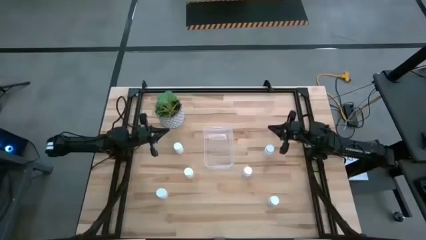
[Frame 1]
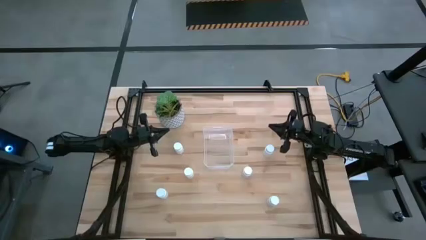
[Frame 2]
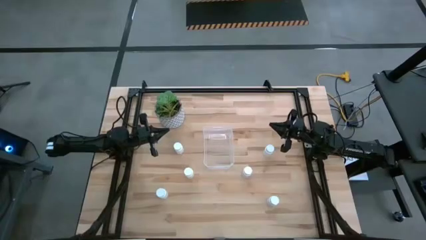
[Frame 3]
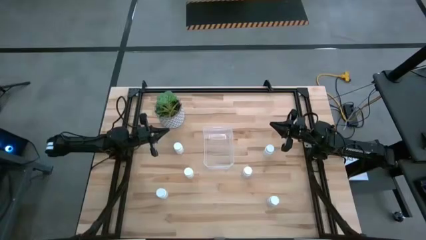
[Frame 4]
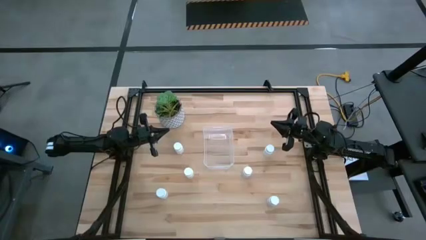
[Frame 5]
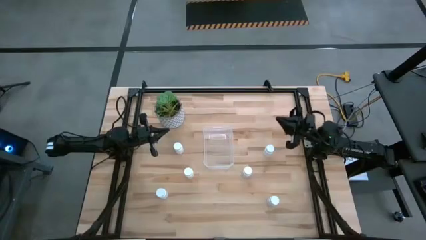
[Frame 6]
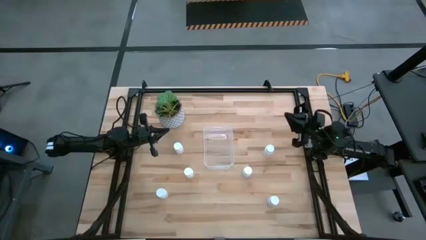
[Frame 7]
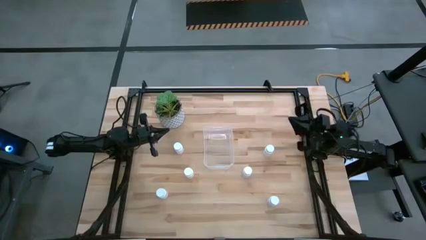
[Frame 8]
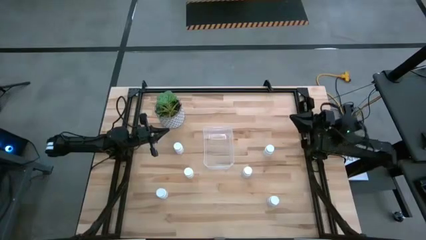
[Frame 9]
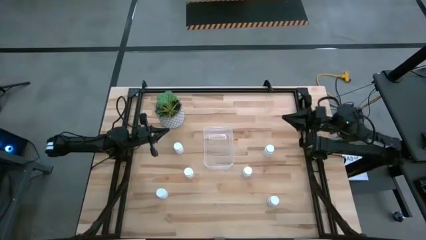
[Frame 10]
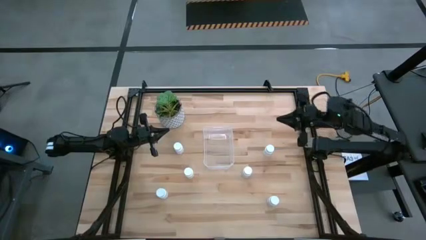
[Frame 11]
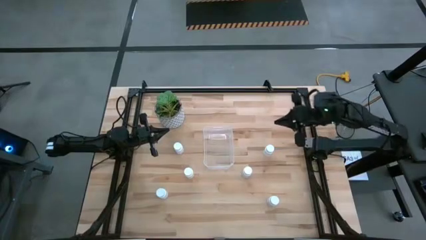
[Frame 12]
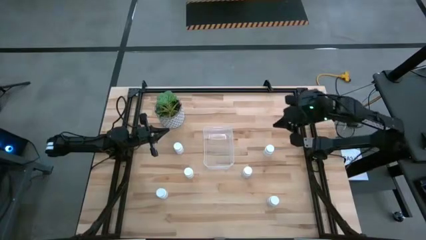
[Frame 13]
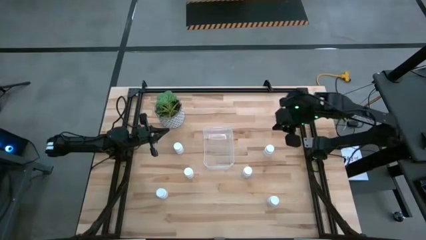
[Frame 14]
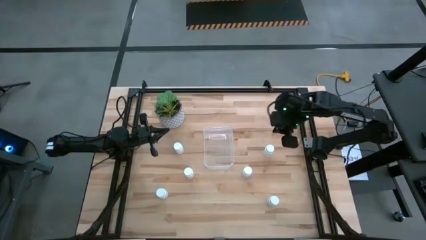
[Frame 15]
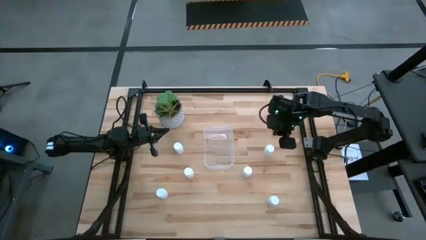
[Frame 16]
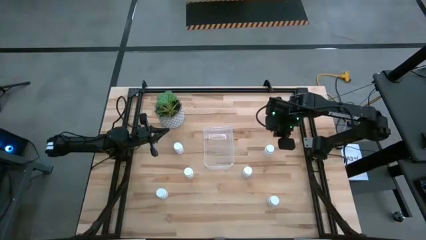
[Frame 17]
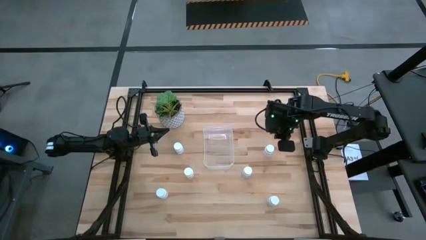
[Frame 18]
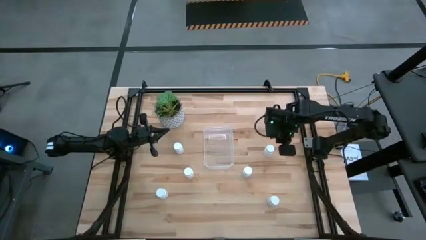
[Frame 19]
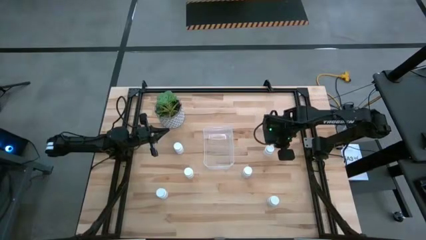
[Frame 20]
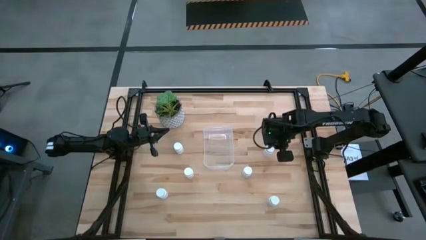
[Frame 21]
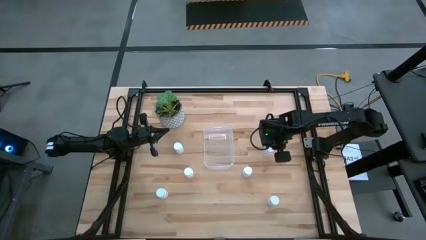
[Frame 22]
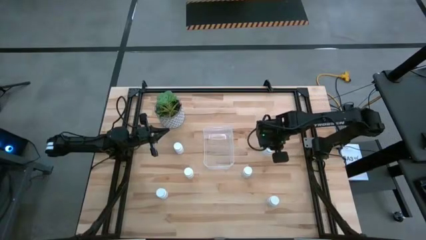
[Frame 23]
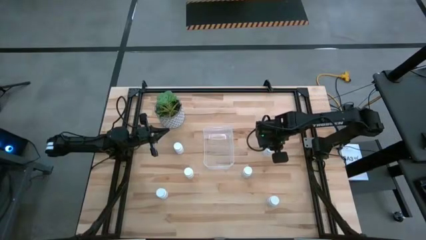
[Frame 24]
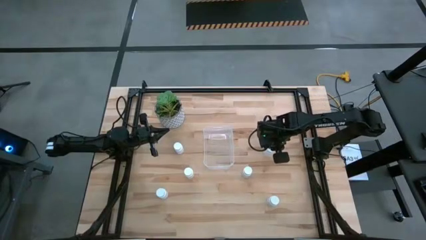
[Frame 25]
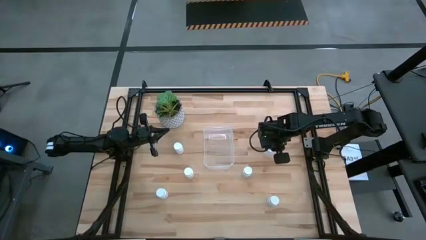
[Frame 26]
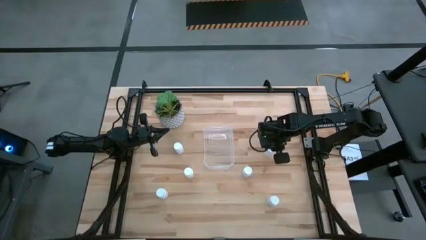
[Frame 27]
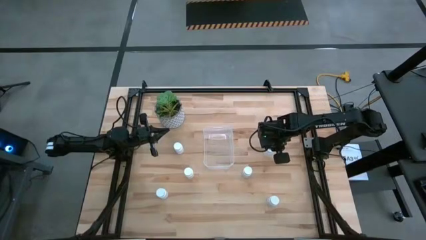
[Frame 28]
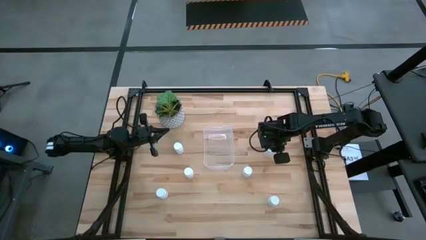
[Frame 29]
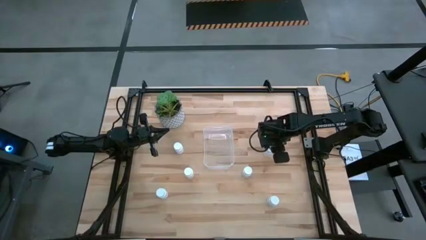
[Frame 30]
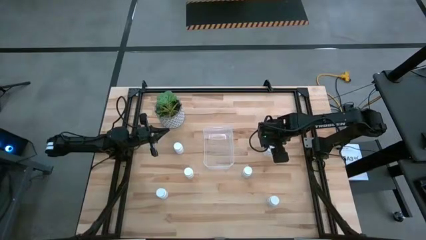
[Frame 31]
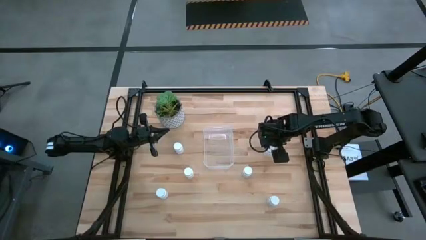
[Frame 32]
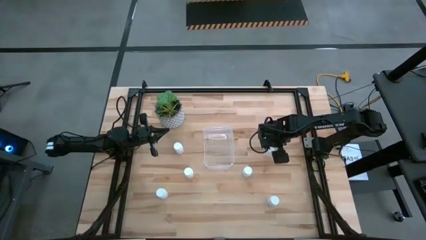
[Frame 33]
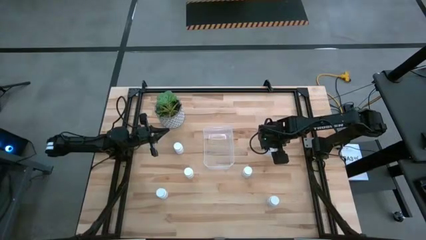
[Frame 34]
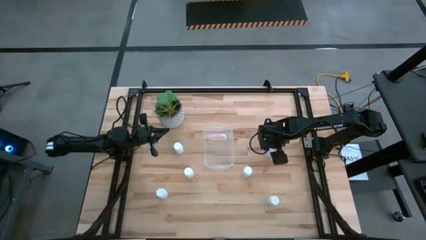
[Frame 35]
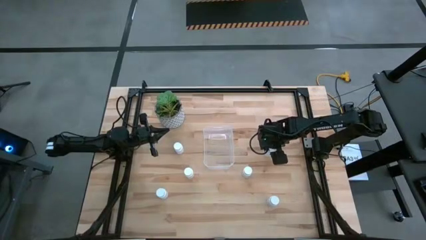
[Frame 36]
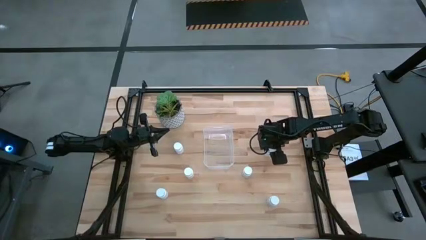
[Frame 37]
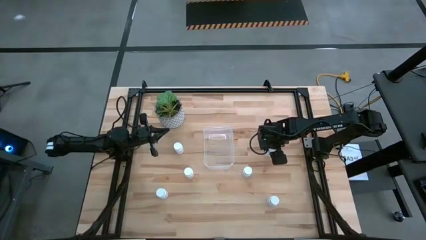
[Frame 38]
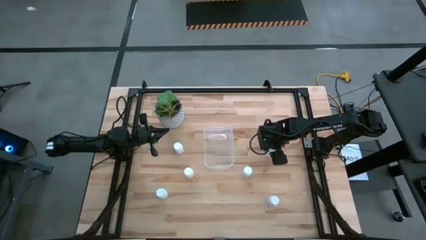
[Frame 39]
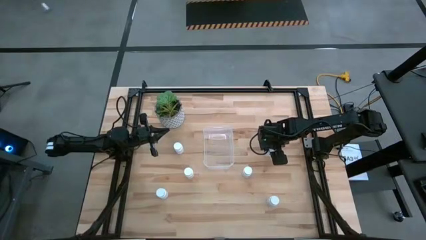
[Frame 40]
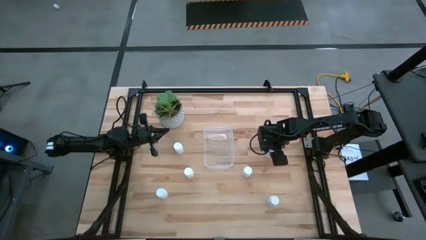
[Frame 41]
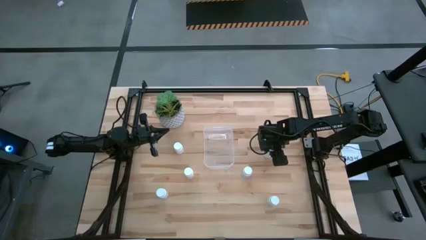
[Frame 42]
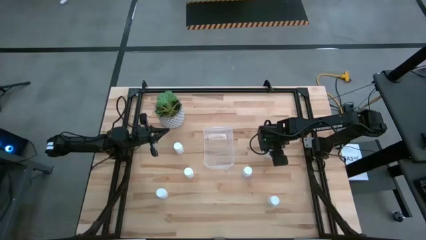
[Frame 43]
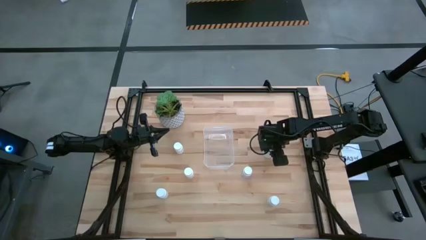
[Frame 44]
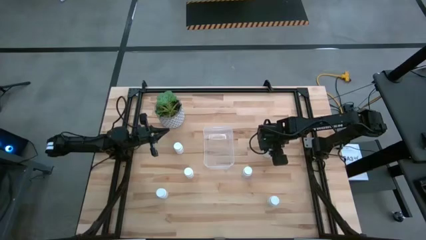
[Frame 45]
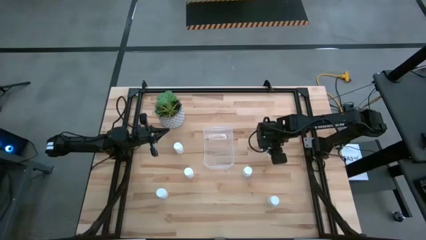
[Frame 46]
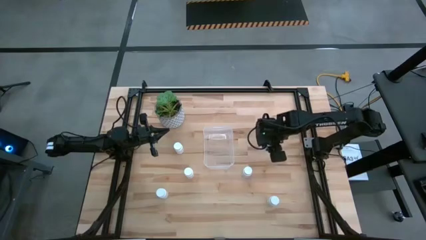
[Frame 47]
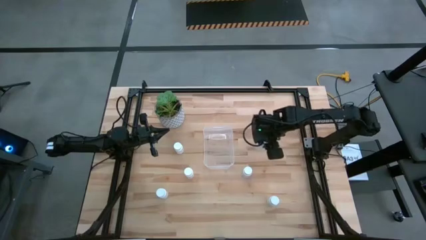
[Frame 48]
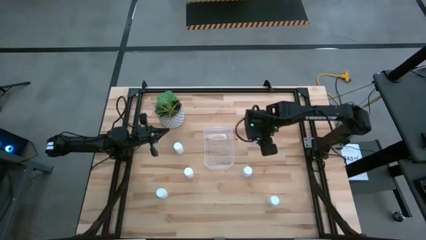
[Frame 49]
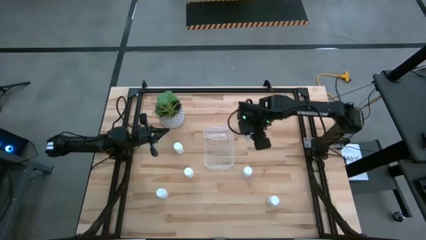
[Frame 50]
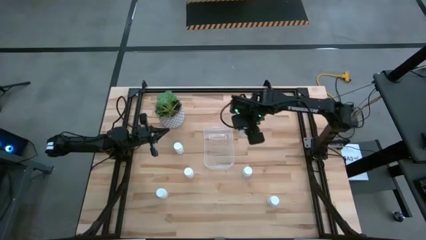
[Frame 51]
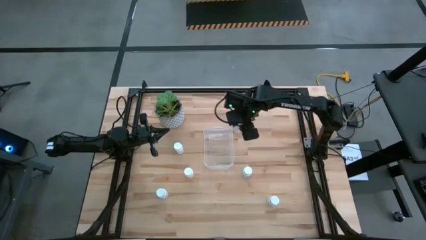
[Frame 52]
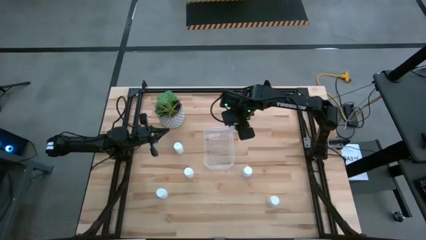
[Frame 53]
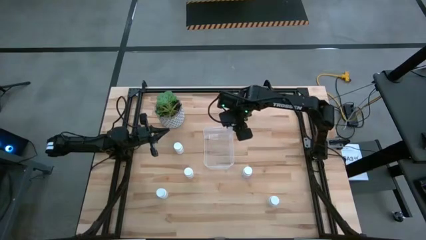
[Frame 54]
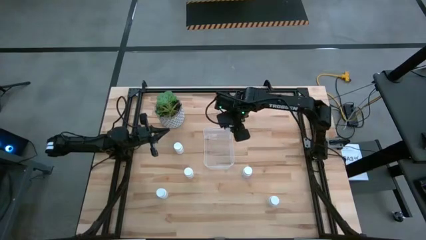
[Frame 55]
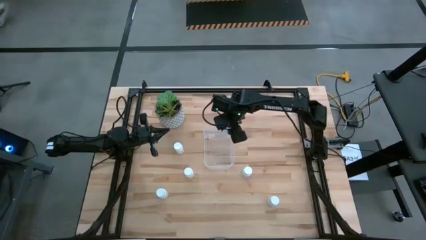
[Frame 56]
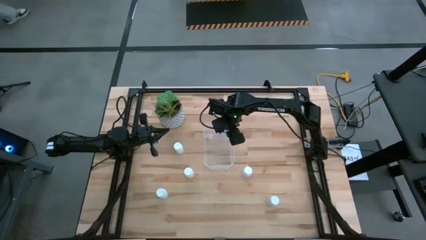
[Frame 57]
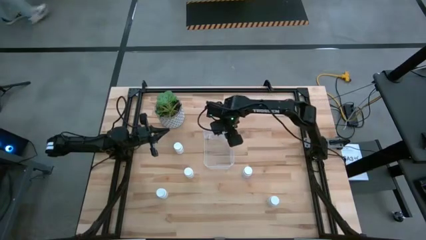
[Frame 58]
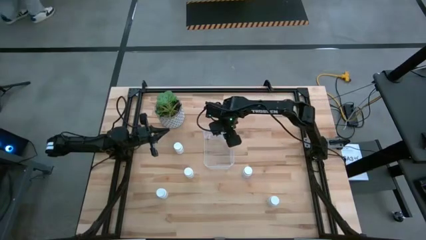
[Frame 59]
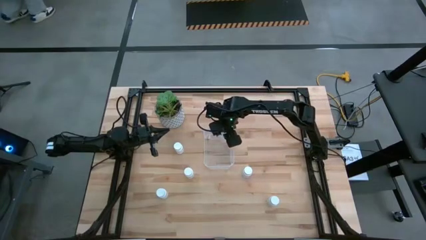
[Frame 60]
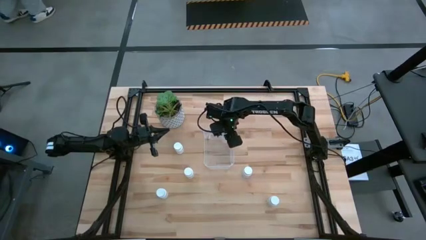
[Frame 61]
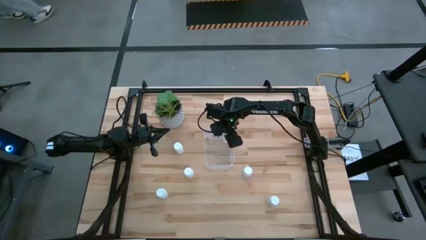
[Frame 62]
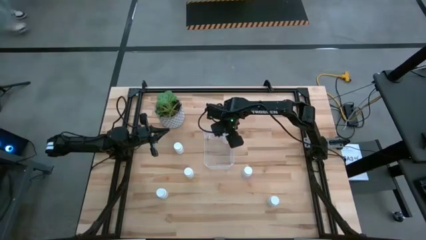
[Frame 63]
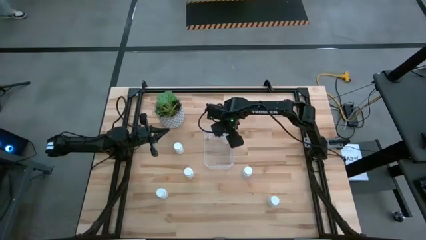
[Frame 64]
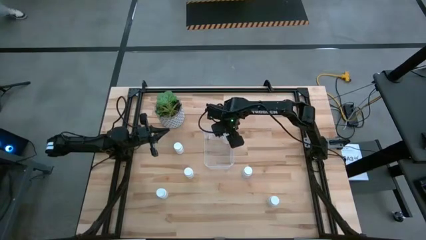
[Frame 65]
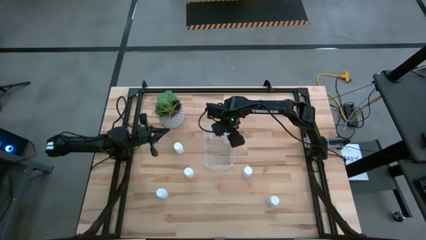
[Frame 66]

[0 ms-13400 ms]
Task: Pick and place pill bottles into a basket
Put the white pill bottle into the transparent container
